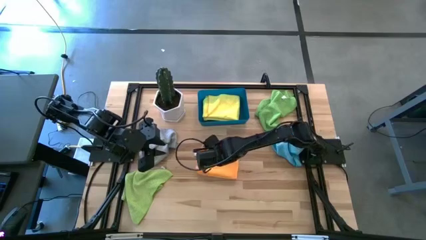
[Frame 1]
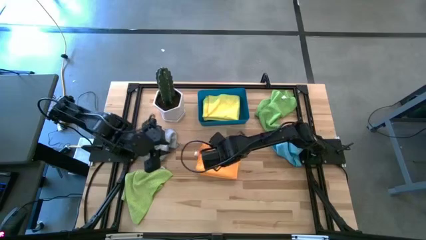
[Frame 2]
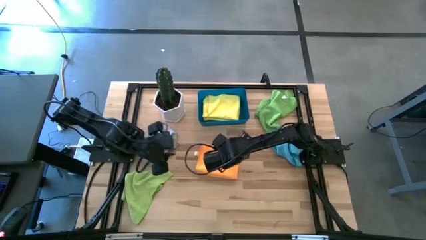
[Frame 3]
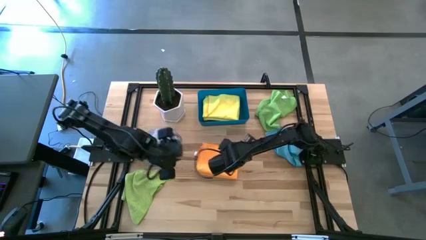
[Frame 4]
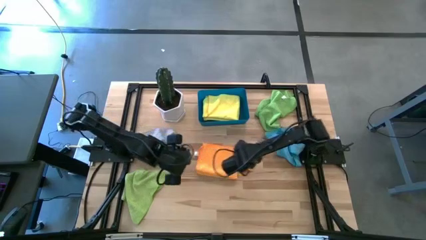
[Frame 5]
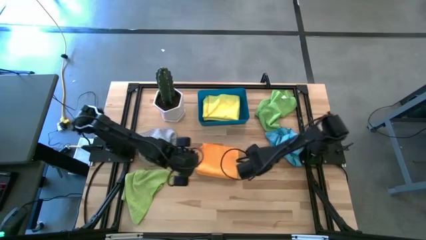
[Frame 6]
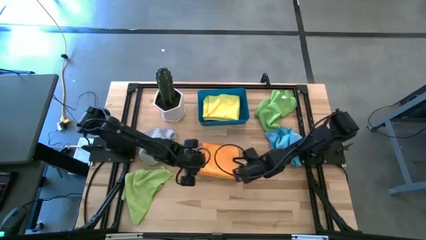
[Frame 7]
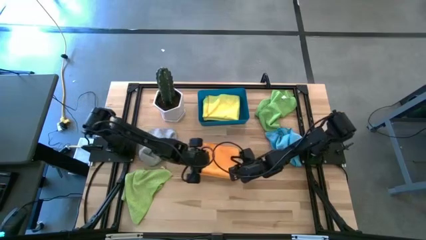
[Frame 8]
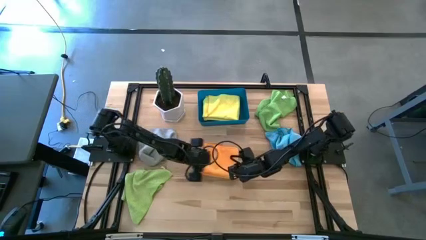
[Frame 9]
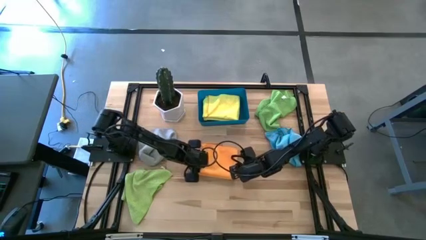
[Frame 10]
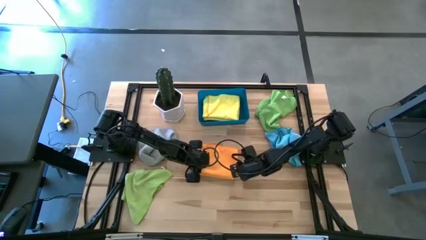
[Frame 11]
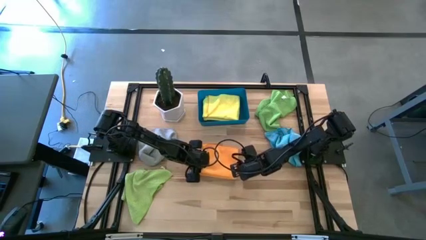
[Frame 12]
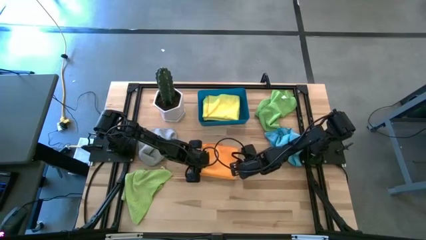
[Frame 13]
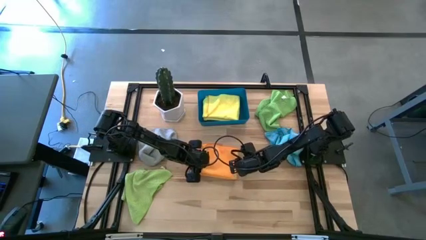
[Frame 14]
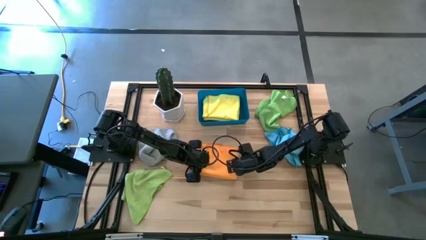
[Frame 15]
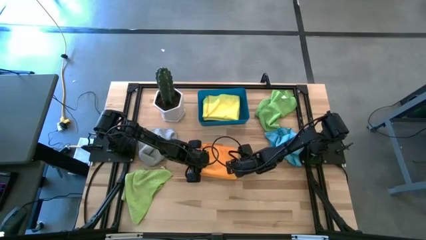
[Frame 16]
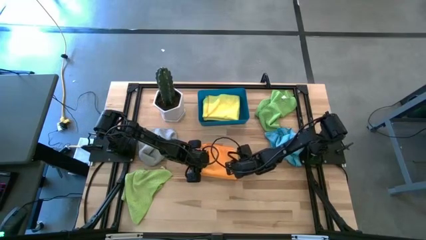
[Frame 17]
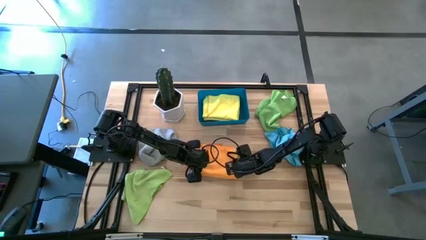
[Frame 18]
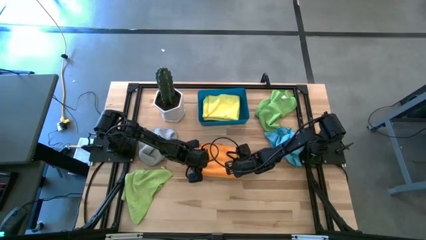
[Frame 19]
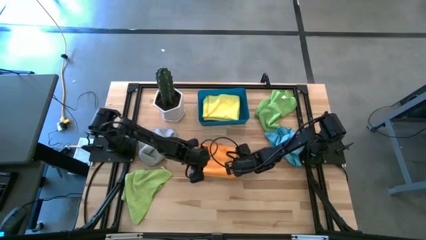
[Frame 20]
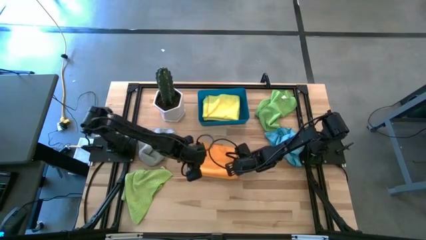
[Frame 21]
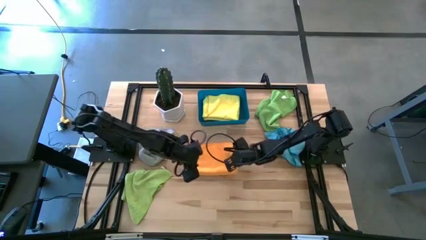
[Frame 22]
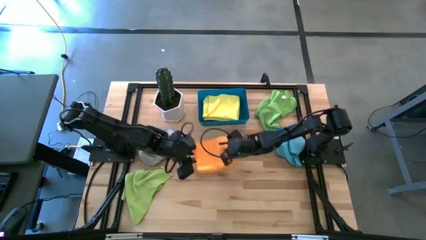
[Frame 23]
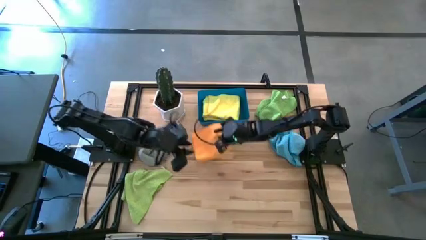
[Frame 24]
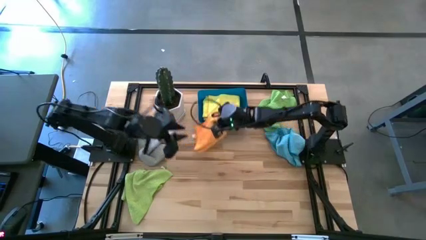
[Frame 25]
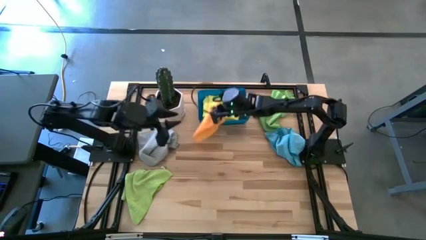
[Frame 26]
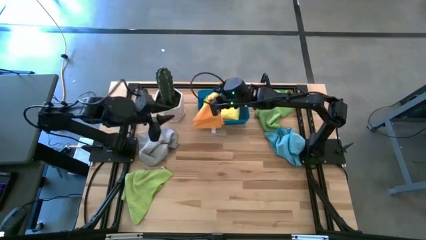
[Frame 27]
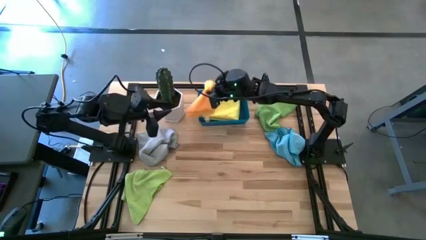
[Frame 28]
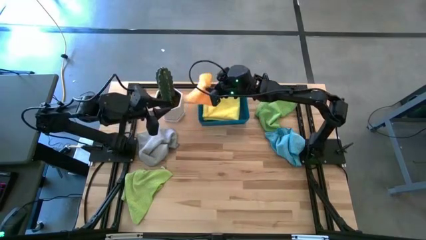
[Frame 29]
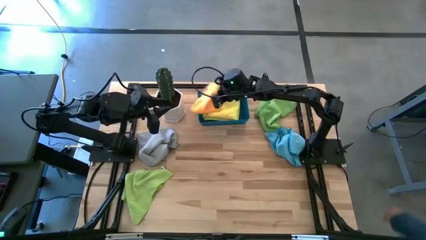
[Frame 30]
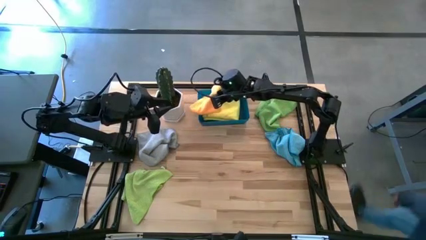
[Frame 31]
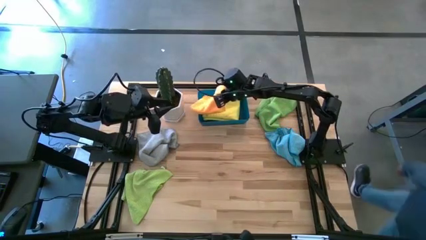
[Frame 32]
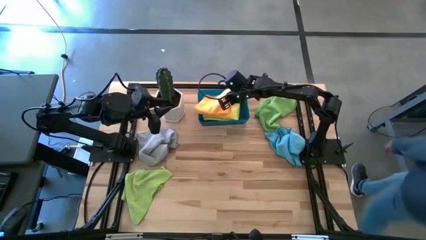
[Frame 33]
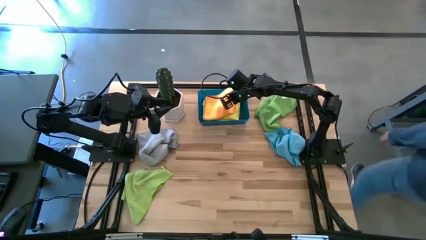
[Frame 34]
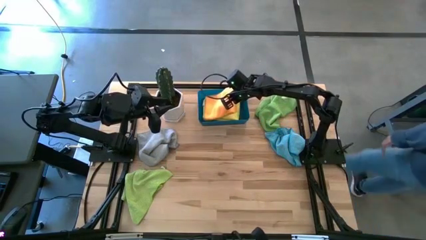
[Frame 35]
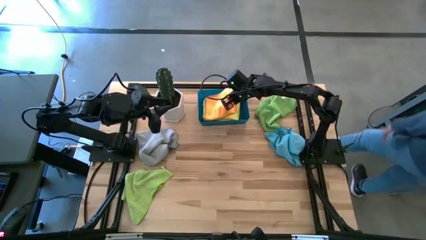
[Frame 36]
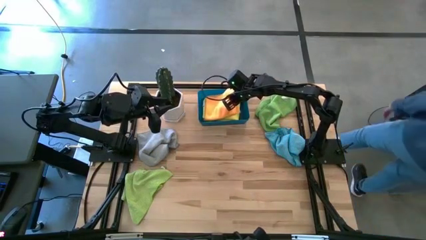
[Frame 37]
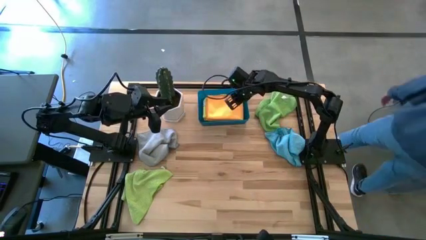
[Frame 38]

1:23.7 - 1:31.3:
Task: Fold microfiber towels
Stack the orange microfiber towel on top of the yellow microfiber towel

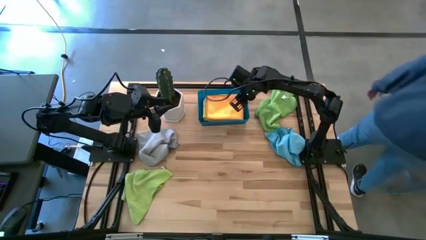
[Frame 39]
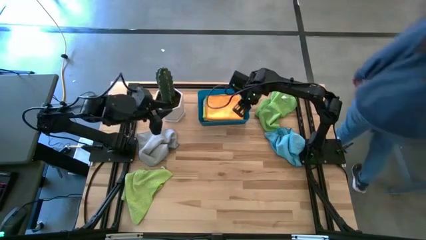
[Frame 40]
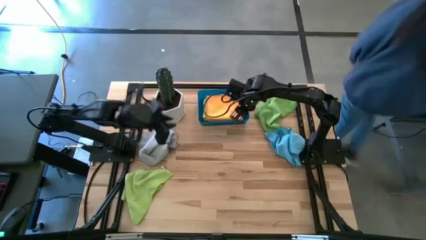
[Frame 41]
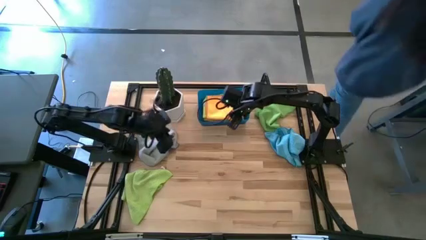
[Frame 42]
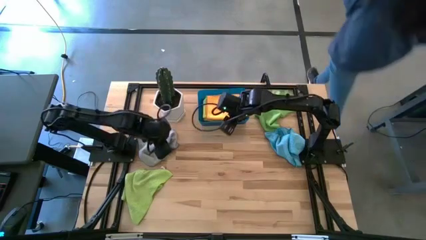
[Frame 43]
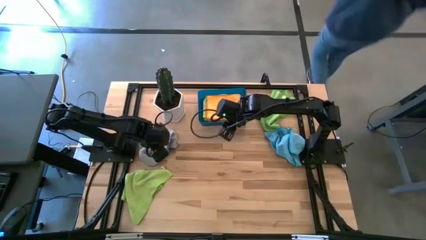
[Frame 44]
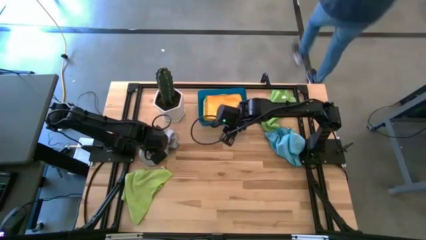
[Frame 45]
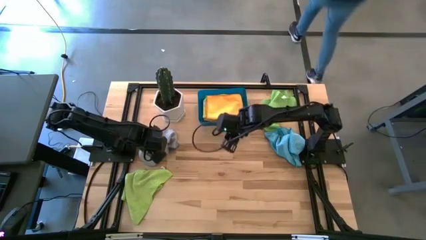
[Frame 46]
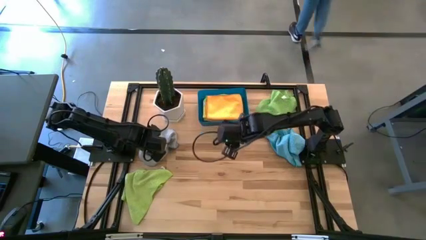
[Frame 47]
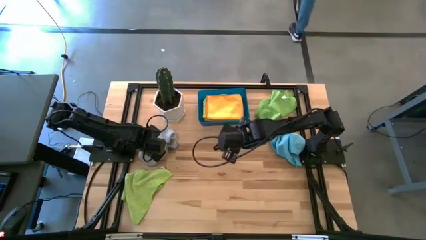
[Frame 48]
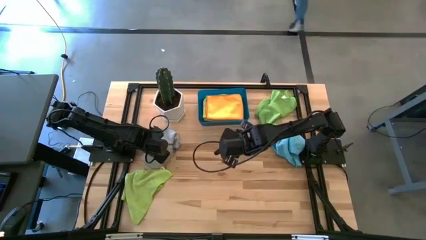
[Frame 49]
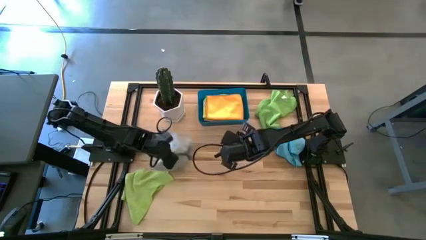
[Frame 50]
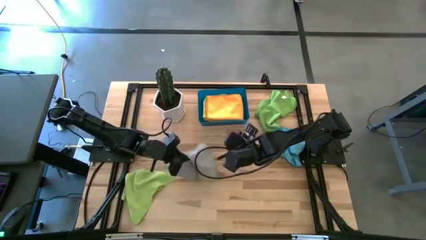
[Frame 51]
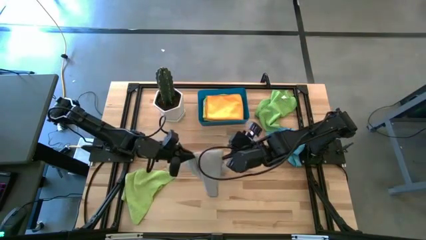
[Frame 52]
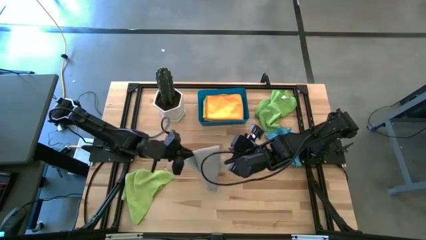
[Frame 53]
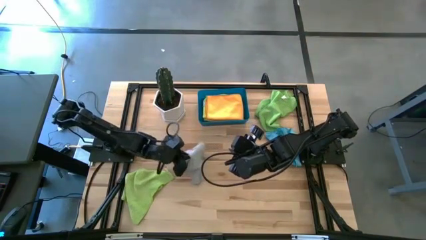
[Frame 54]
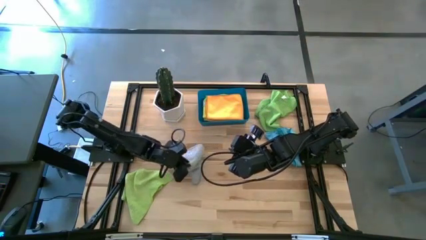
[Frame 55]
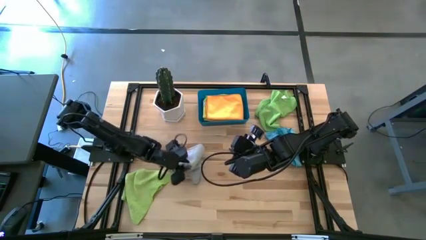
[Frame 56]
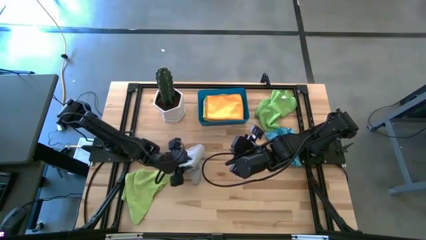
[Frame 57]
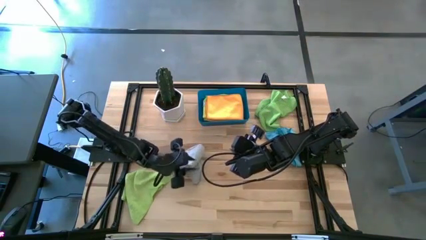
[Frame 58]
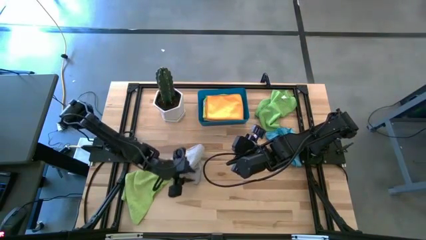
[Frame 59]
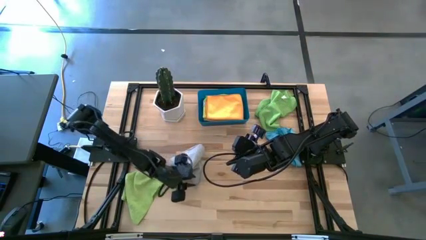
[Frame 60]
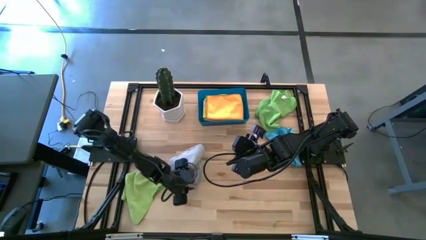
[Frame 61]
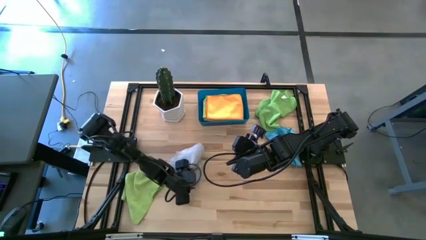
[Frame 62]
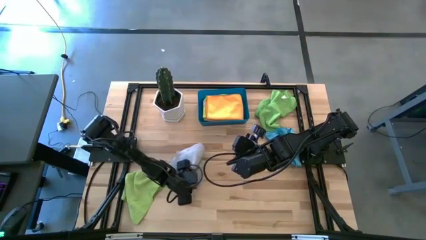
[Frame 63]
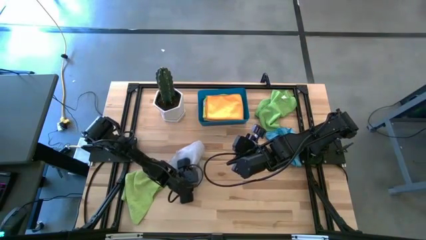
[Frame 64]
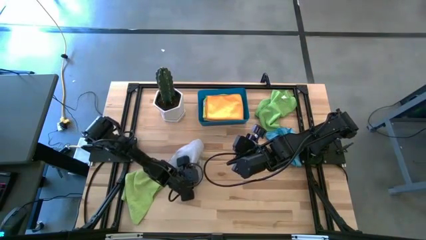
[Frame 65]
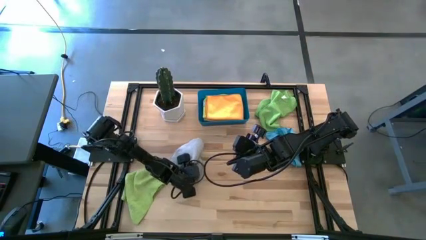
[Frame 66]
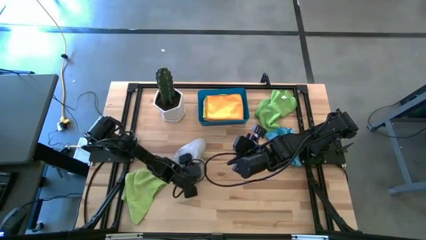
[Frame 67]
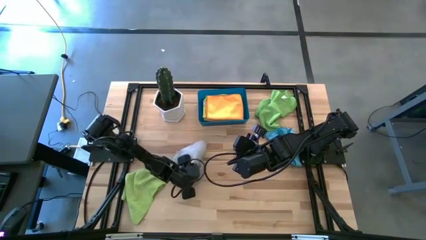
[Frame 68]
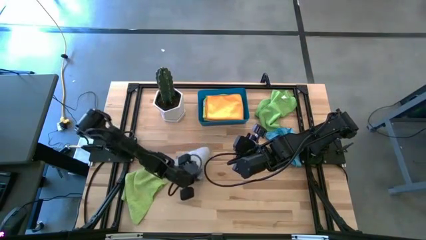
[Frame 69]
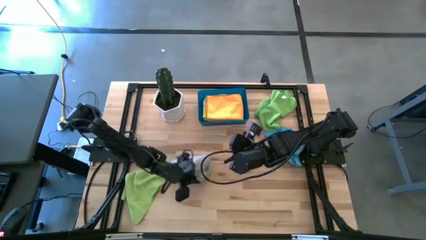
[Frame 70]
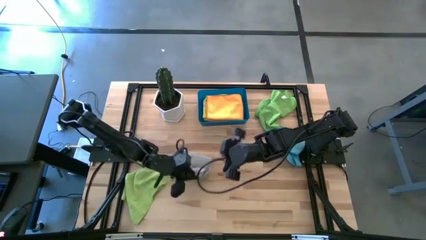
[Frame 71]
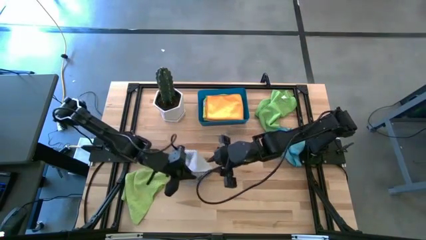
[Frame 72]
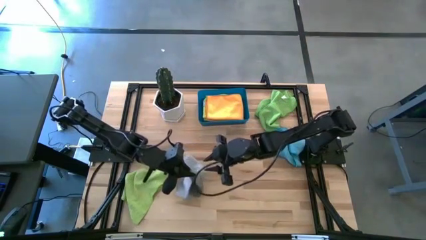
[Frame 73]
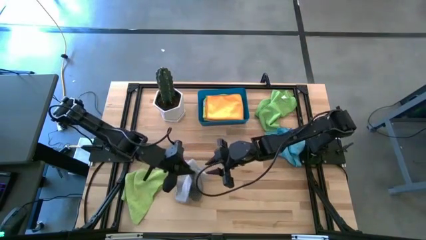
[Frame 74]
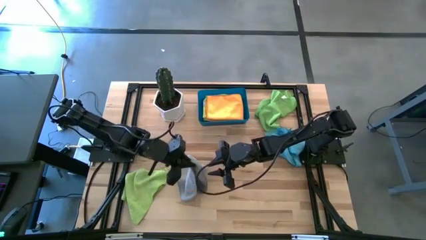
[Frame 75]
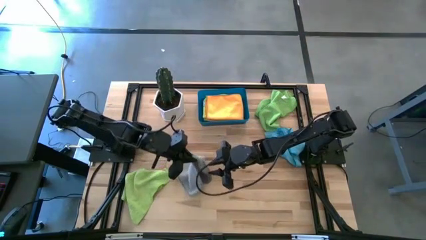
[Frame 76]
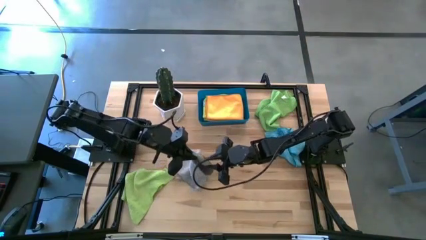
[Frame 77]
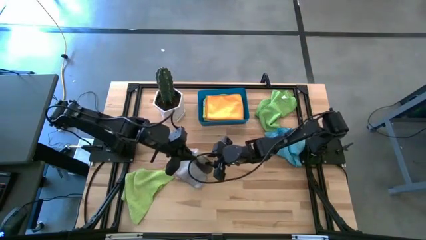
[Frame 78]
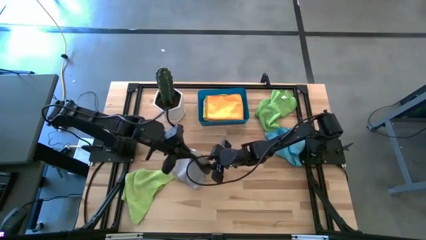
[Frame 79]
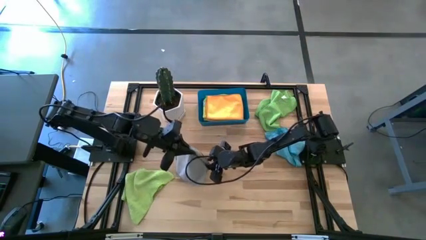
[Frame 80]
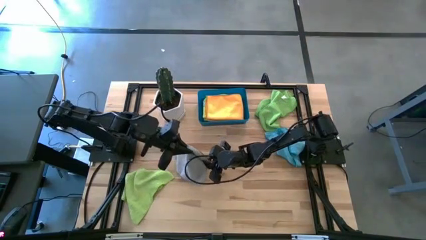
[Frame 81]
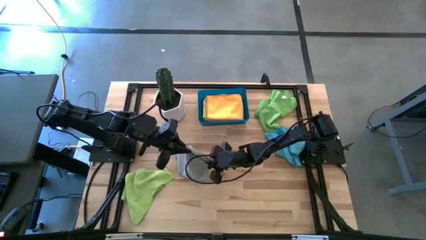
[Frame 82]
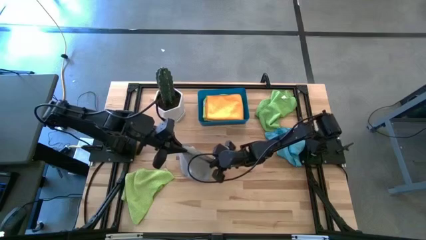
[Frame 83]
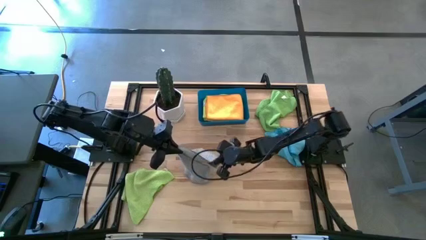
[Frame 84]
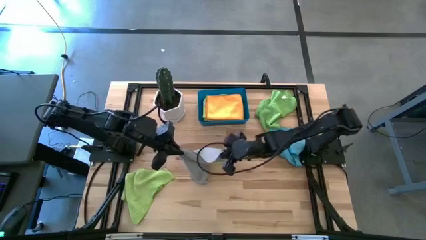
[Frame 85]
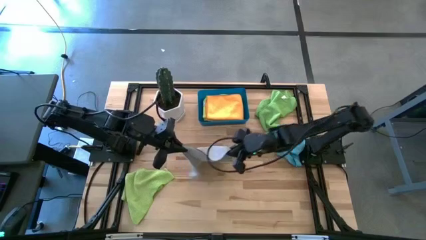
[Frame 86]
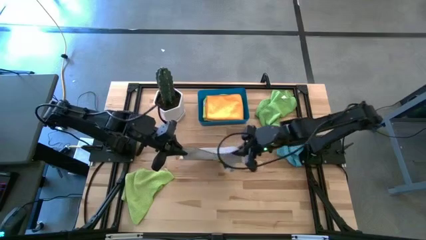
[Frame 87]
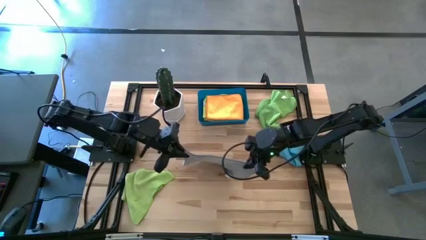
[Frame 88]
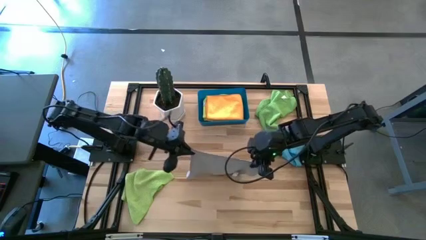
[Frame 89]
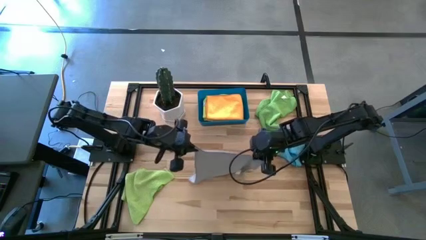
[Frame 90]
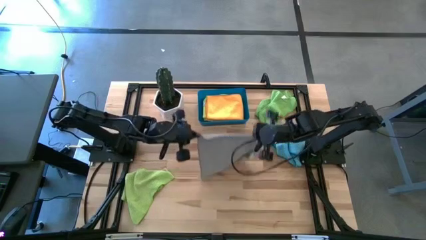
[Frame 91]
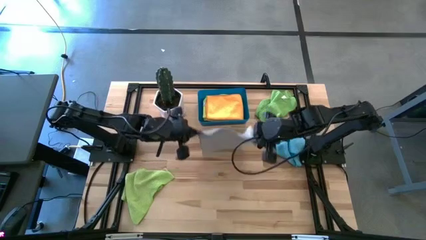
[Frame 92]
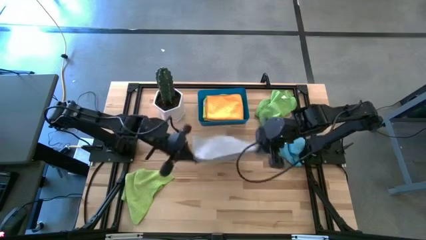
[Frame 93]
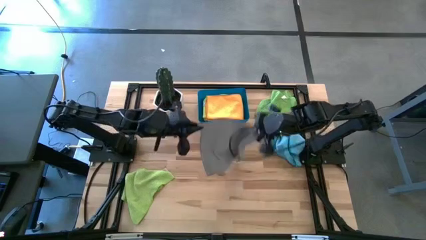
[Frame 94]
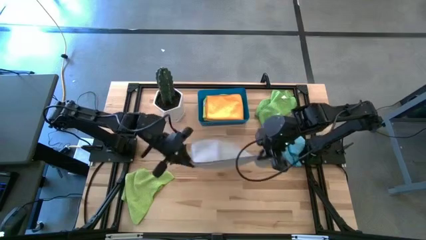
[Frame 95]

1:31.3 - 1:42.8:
Fold the gray microfiber towel
